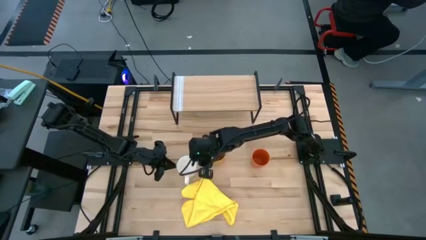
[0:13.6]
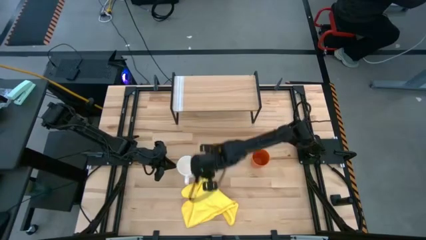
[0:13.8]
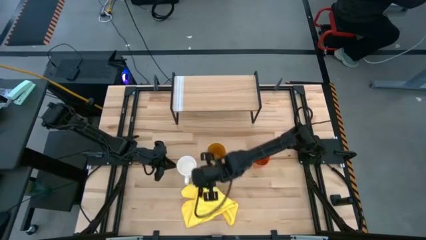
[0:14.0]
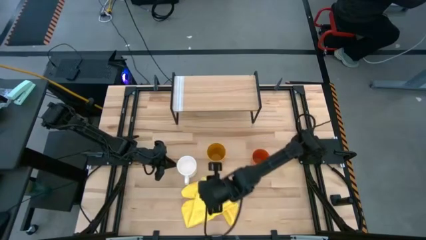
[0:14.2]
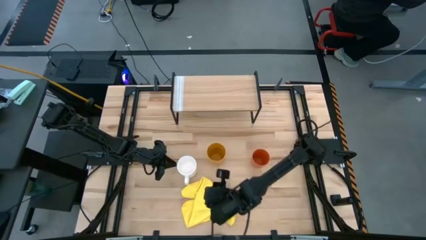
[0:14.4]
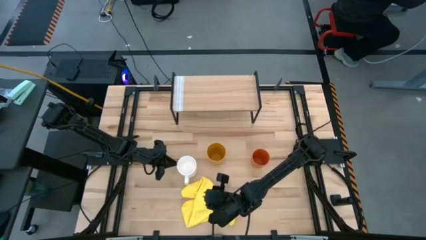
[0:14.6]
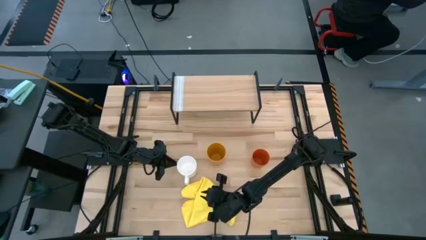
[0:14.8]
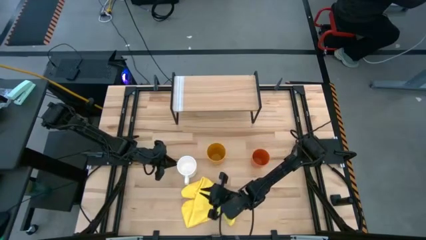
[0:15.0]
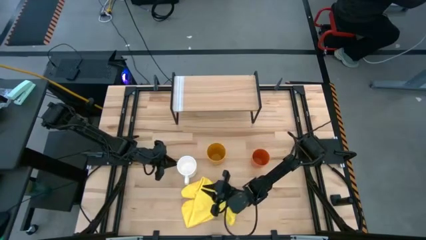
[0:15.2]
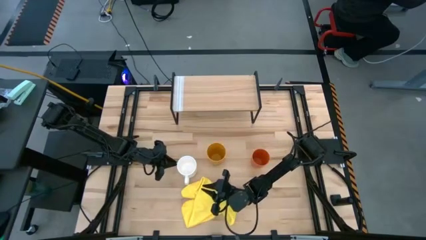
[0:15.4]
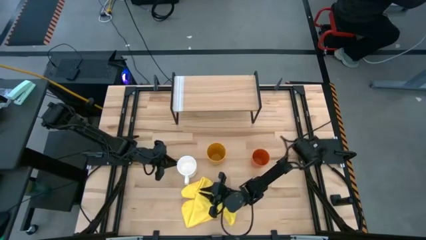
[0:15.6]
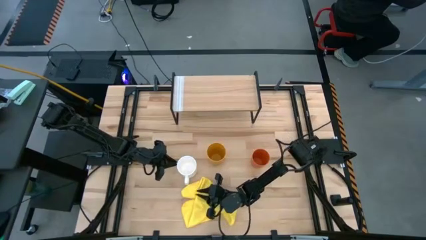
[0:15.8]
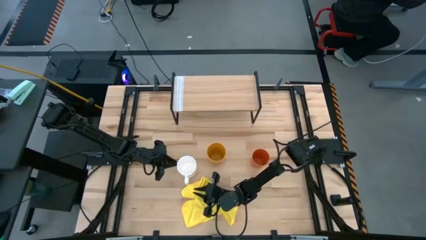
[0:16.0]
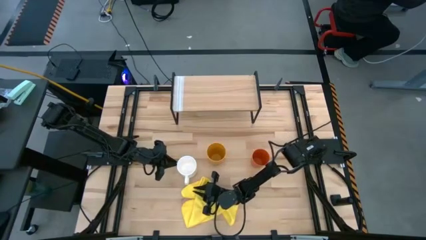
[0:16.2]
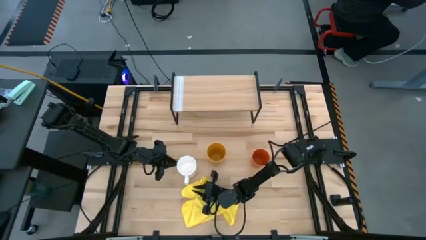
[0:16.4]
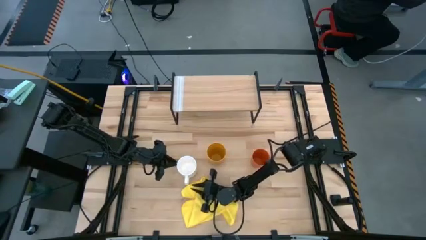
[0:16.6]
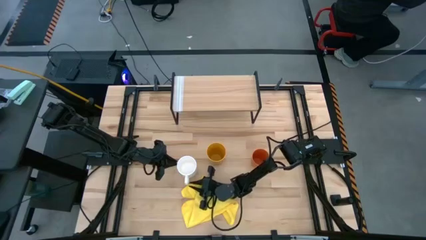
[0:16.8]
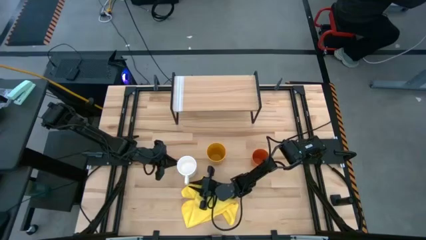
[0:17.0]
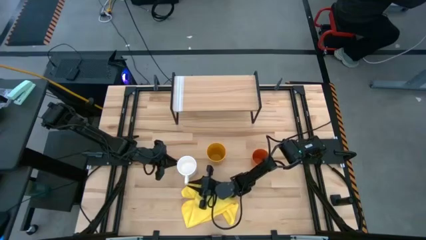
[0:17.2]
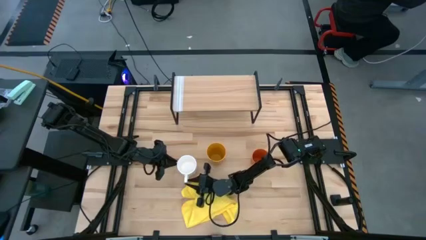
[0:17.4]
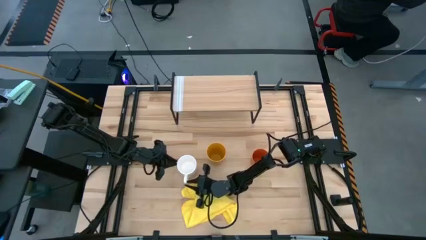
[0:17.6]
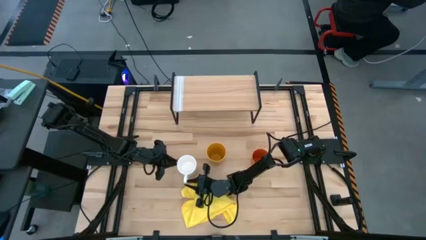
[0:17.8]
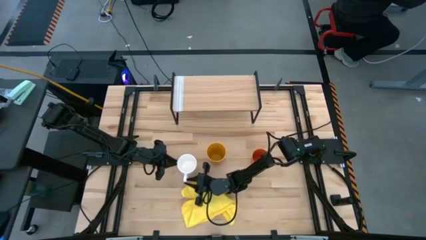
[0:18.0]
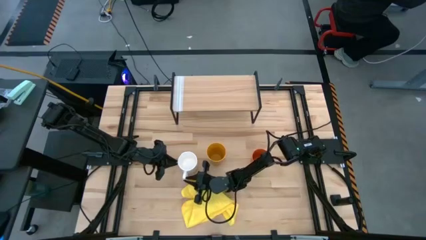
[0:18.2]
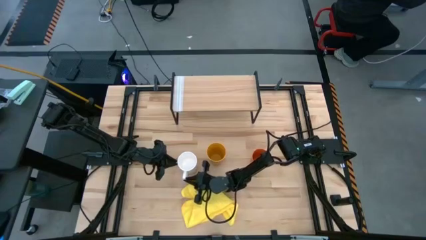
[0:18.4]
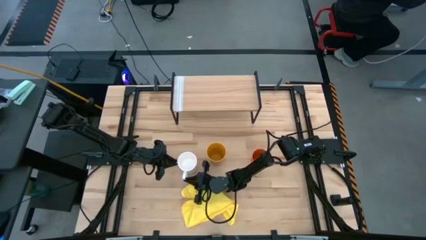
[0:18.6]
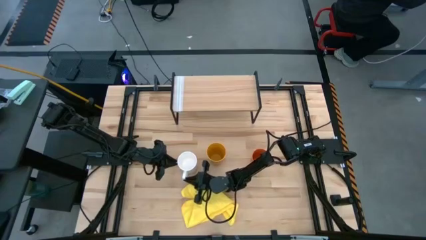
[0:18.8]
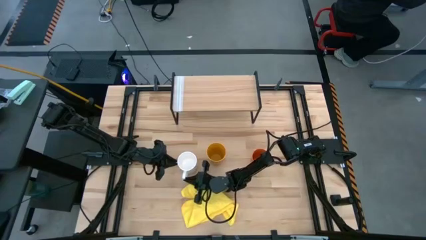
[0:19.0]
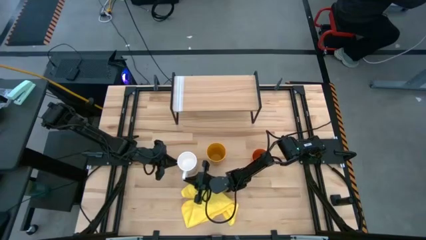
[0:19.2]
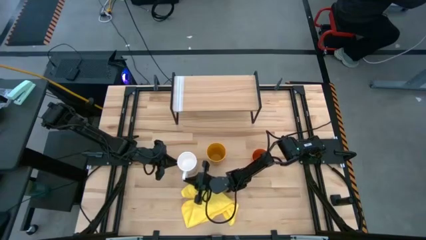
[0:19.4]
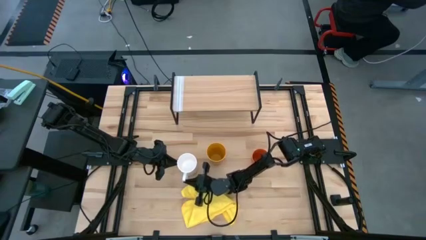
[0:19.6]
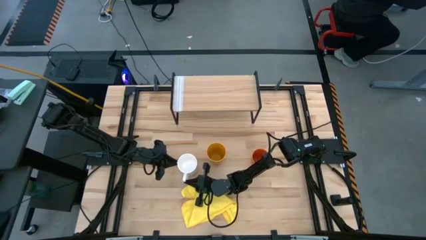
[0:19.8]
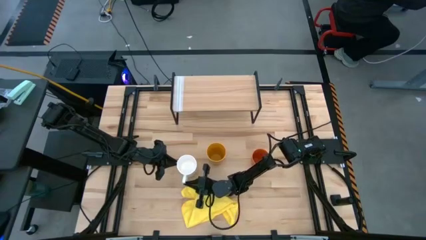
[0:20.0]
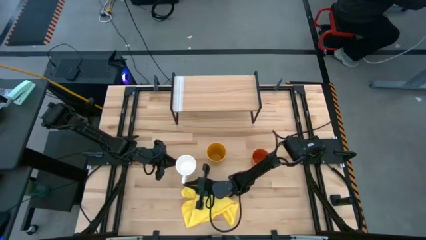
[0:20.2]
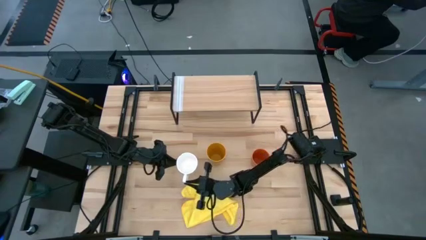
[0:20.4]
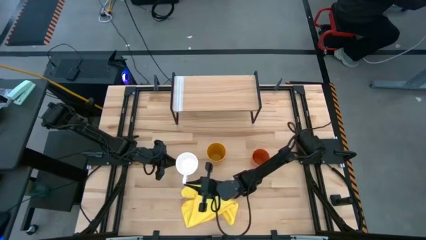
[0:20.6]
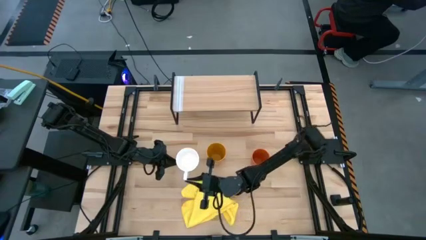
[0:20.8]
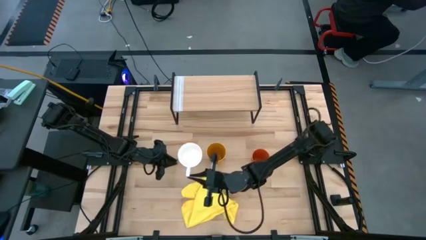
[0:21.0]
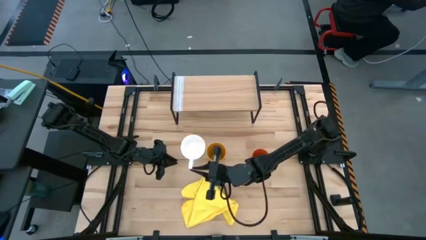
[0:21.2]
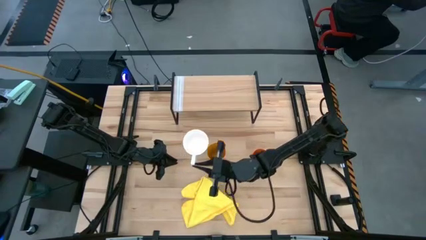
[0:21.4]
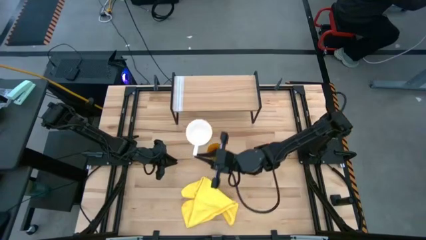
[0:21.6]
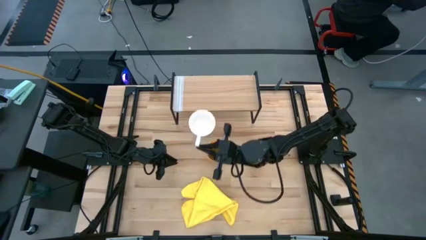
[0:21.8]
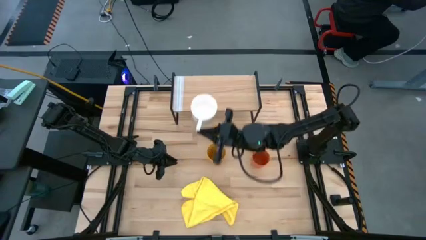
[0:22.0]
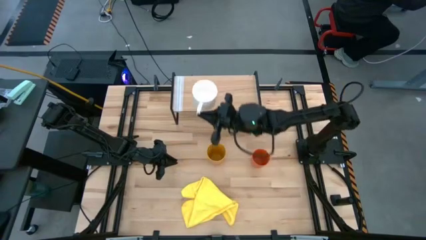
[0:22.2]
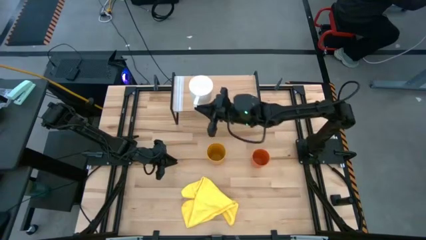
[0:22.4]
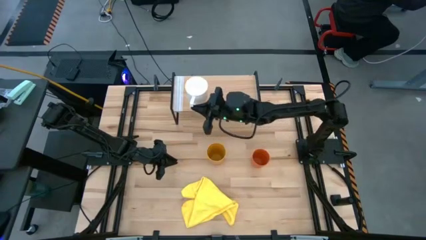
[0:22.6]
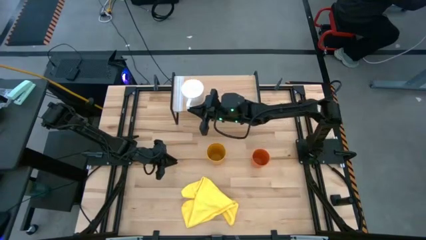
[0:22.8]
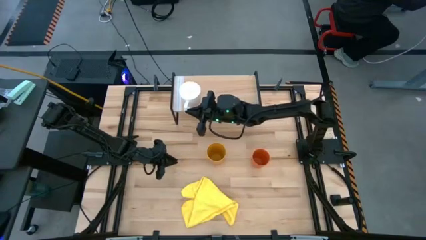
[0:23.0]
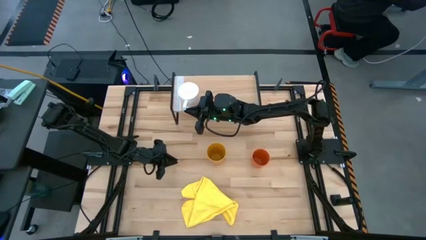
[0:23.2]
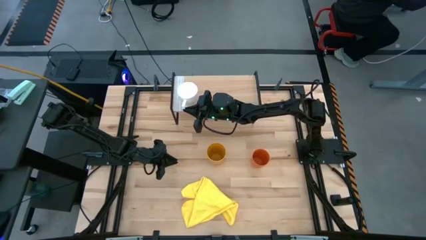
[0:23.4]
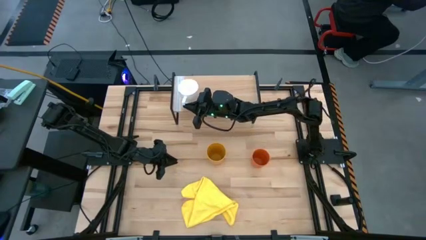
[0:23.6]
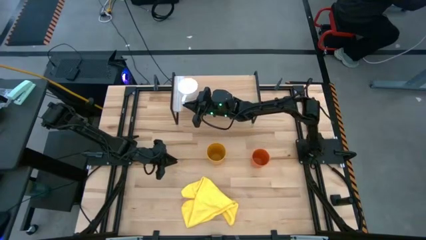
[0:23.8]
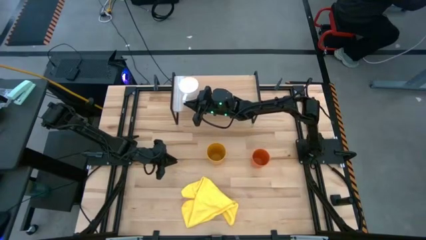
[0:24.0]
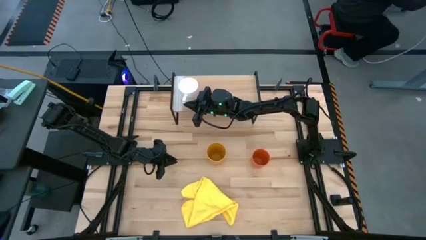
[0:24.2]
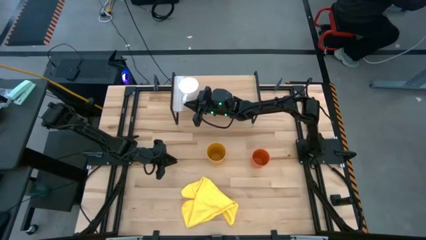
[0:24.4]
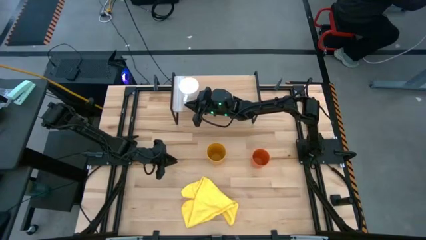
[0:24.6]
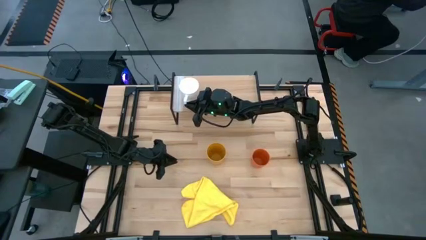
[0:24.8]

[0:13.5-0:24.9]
Task: Stack small to large cups/mugs on shelf
Put the white mug on the shelf

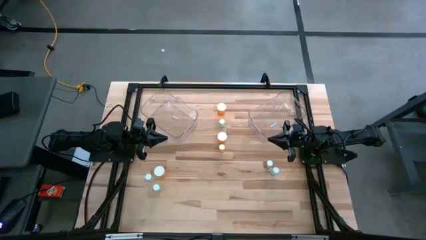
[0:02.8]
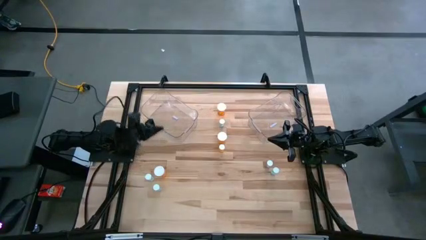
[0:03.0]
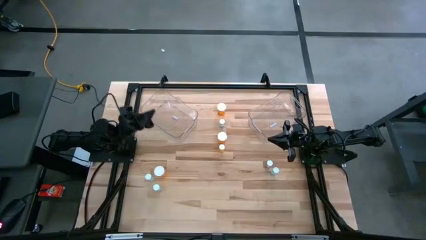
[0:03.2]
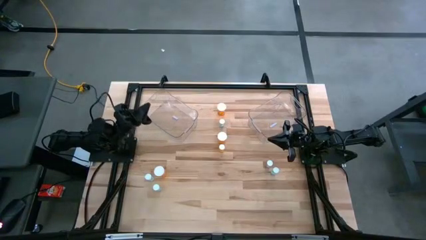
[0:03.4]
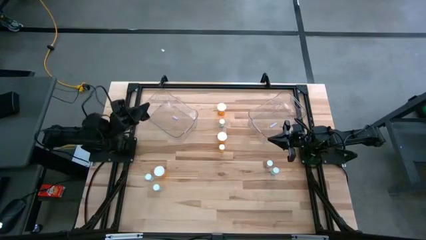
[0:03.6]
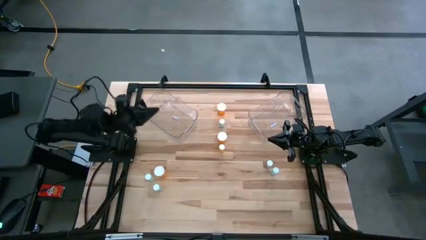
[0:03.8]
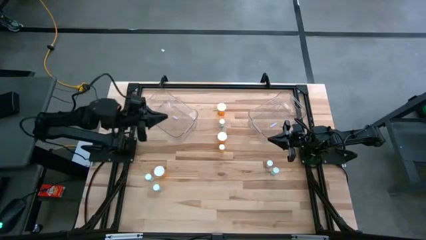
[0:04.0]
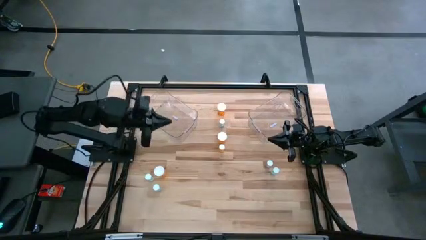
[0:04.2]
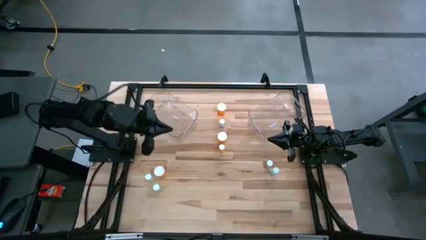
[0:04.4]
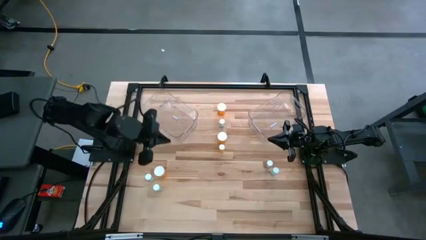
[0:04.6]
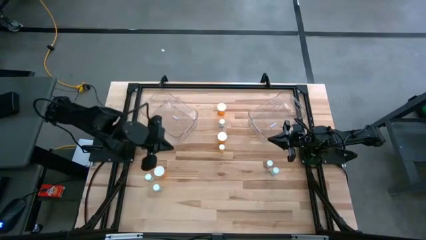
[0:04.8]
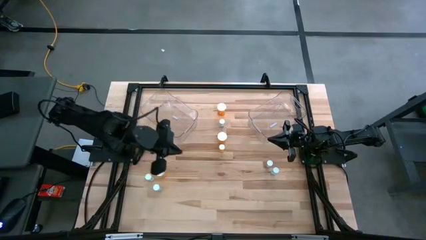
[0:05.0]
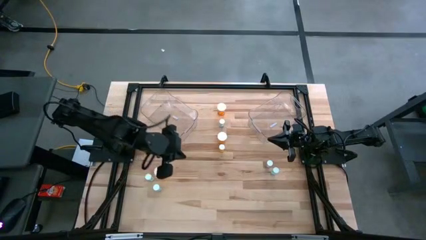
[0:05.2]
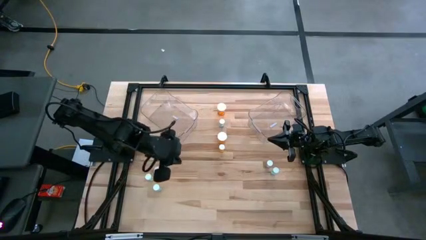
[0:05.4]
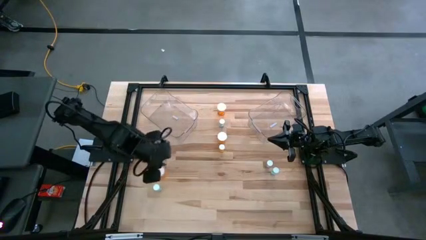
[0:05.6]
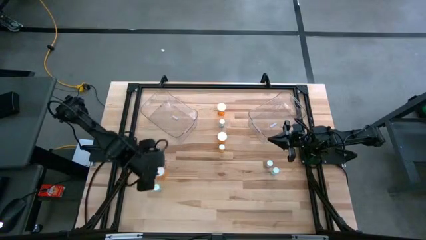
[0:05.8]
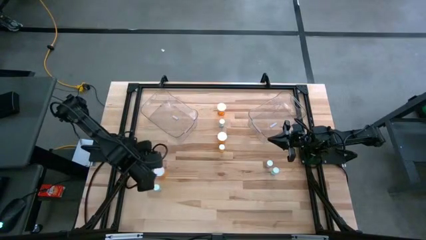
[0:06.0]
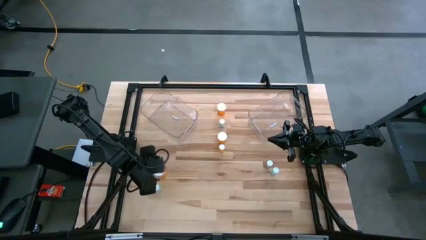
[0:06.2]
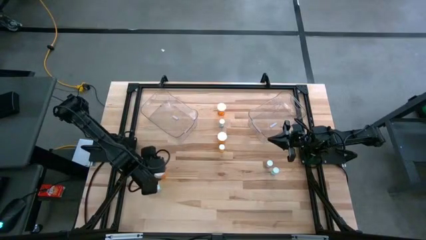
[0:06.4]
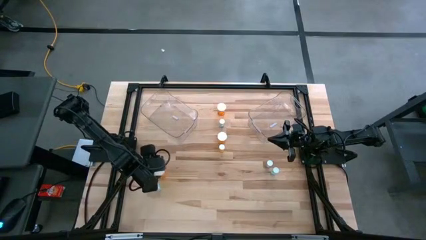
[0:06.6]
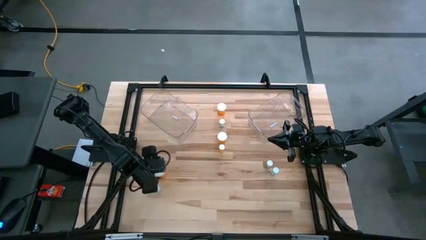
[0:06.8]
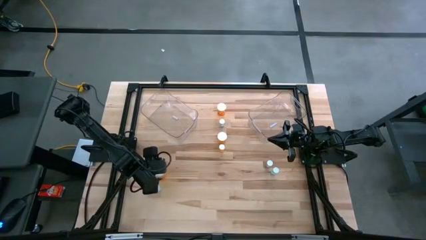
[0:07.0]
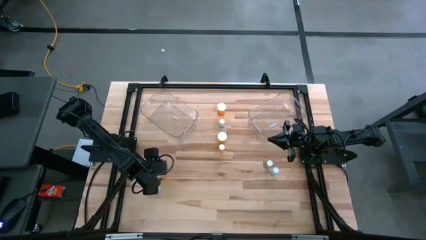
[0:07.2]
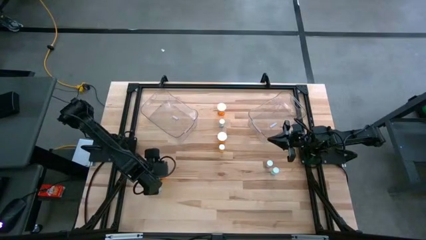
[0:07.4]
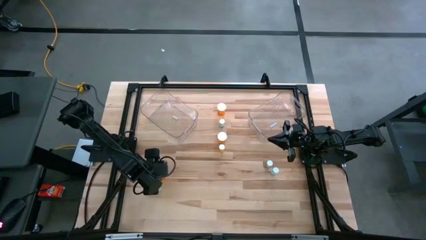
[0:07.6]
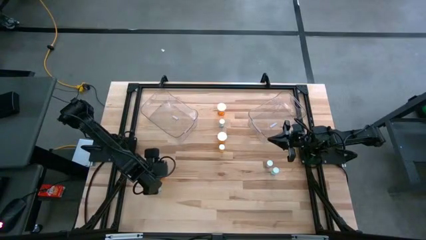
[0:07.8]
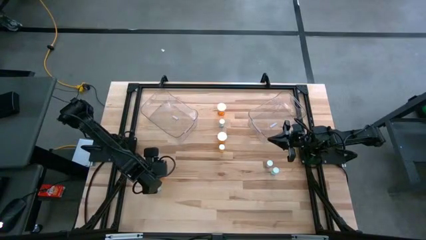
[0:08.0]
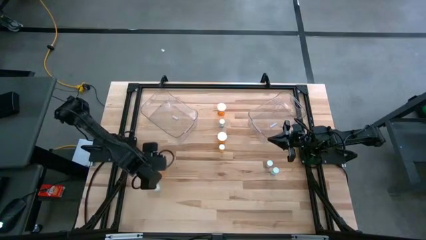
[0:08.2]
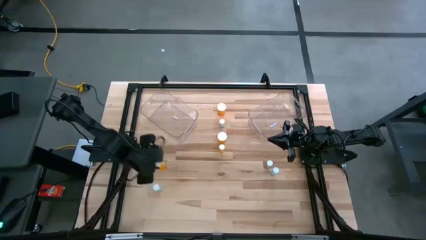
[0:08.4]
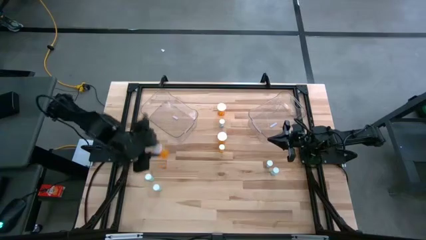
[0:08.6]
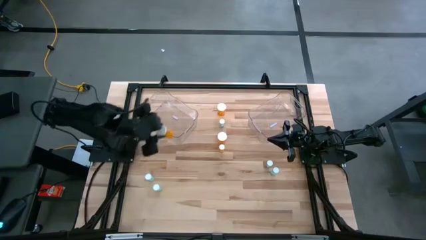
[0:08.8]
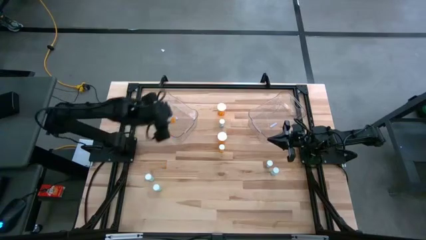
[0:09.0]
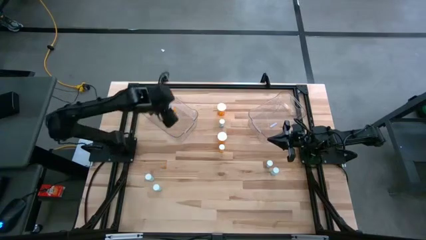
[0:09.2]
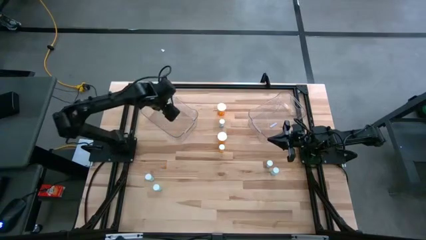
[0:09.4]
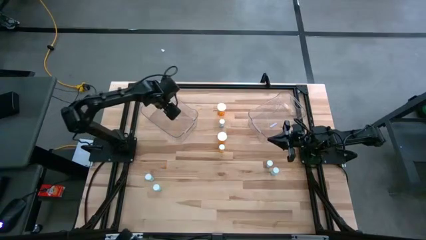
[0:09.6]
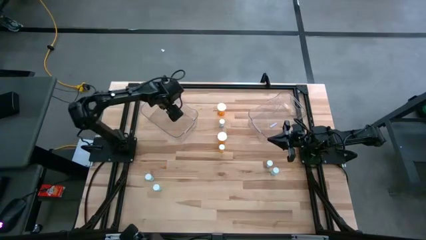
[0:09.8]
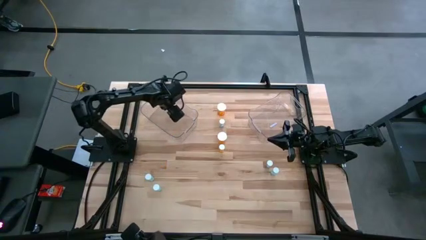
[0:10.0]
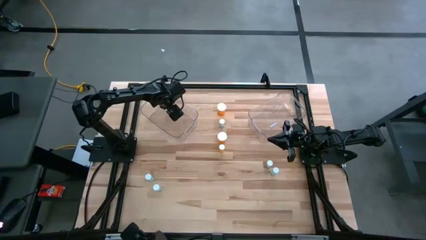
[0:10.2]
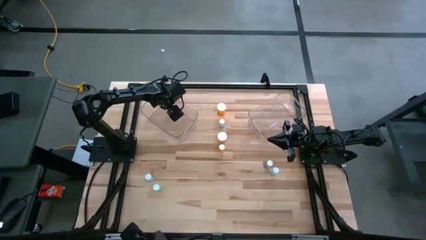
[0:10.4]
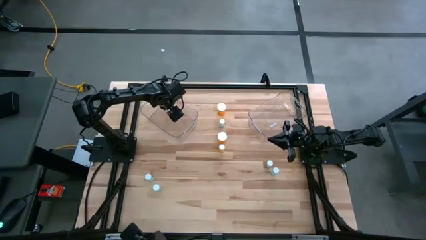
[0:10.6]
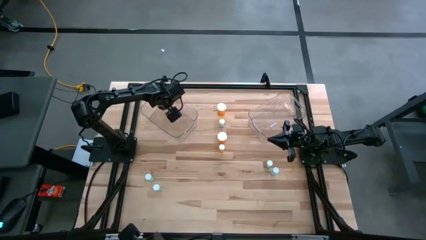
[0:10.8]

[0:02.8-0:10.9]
Task: Pick and place medicine bottles into bin by pill shape (circle, oval)
Put the bottom orange capsule bottle into the left transparent bin
